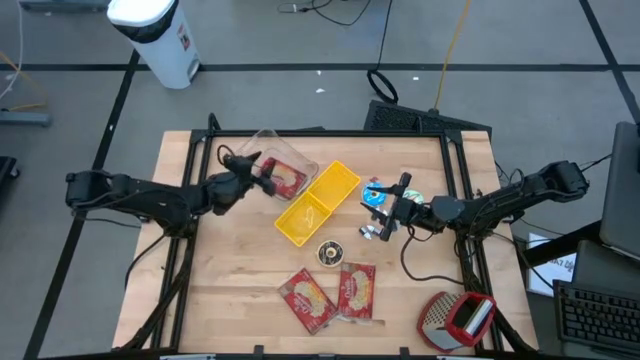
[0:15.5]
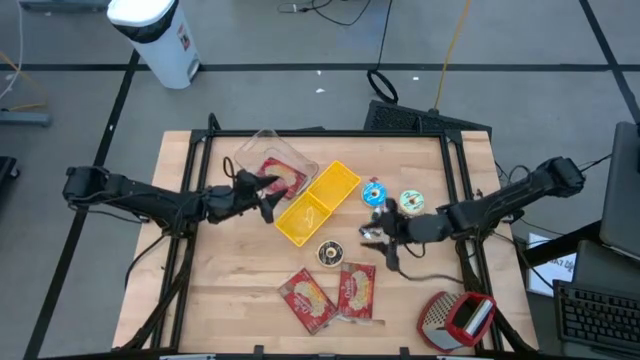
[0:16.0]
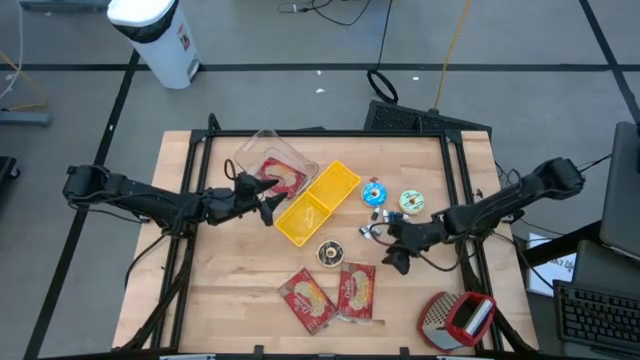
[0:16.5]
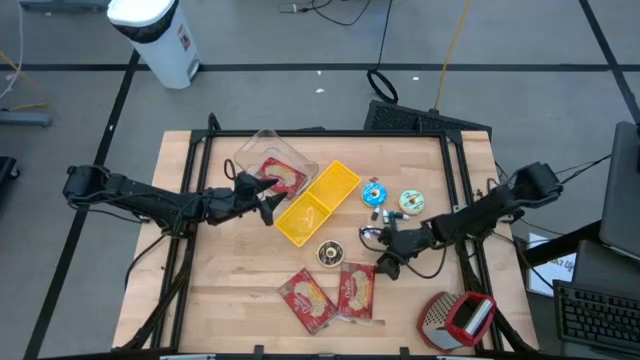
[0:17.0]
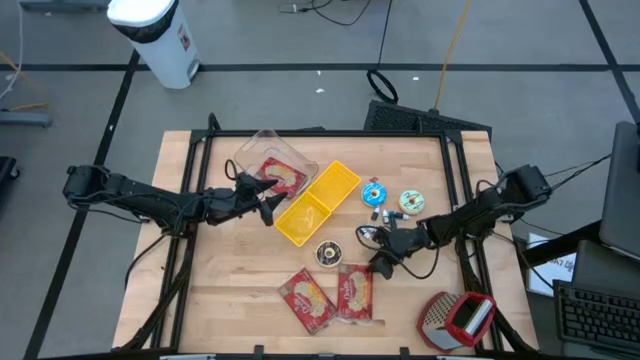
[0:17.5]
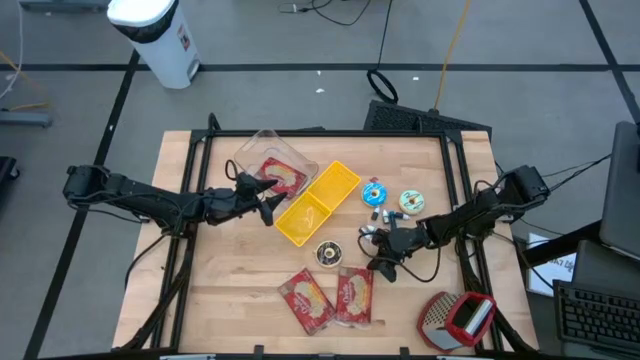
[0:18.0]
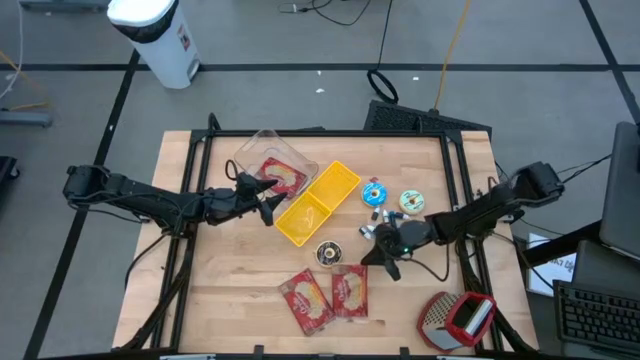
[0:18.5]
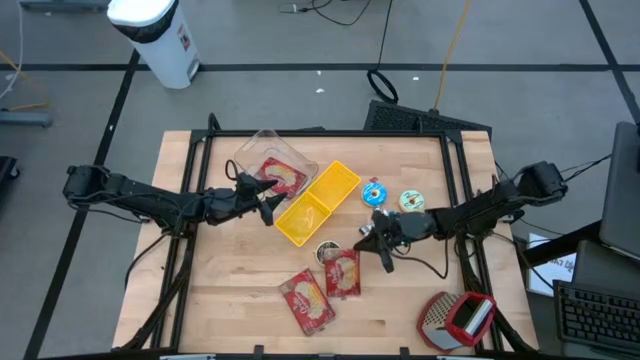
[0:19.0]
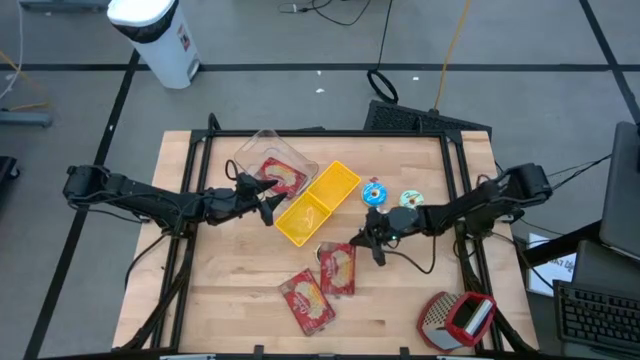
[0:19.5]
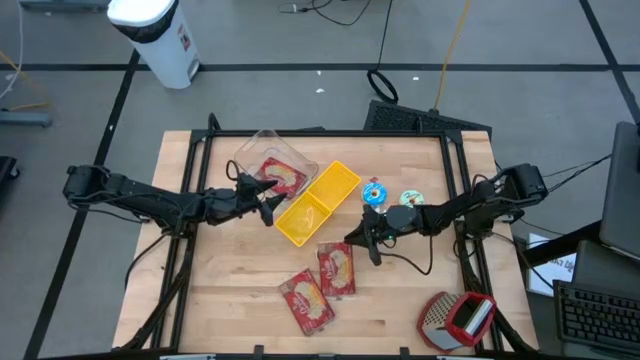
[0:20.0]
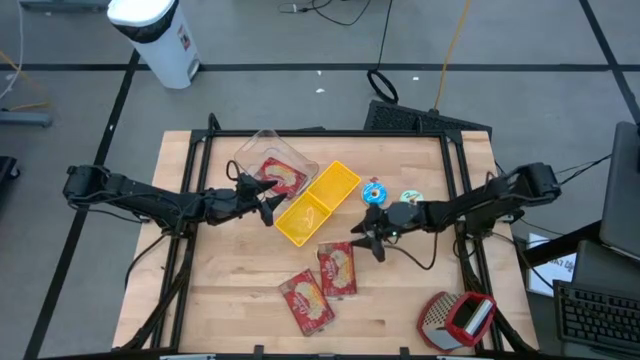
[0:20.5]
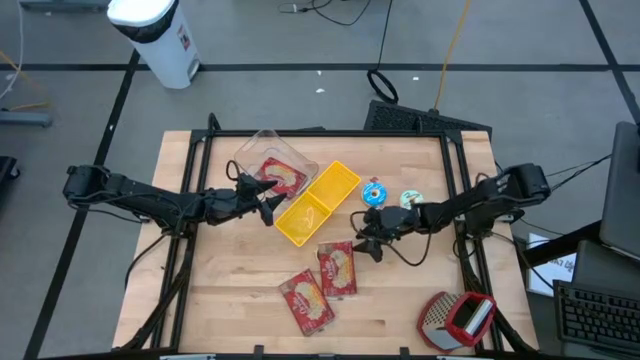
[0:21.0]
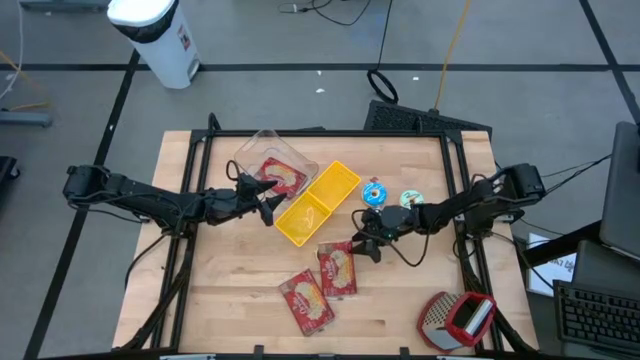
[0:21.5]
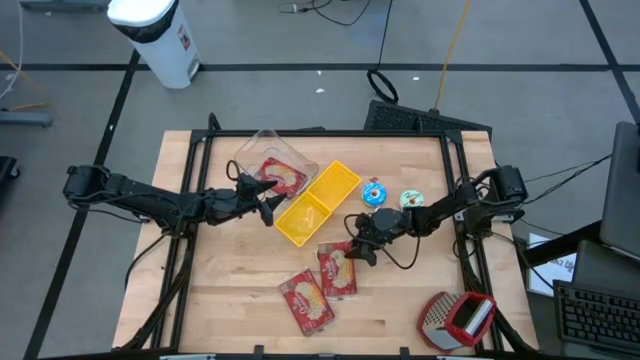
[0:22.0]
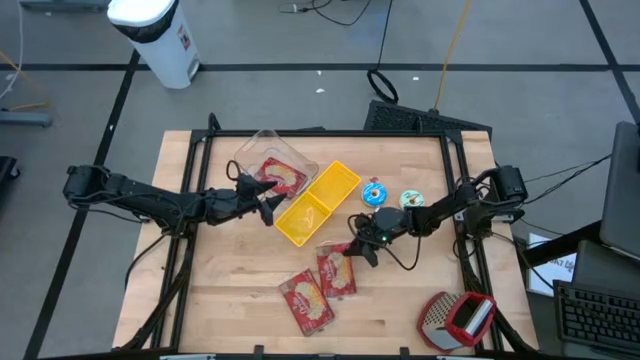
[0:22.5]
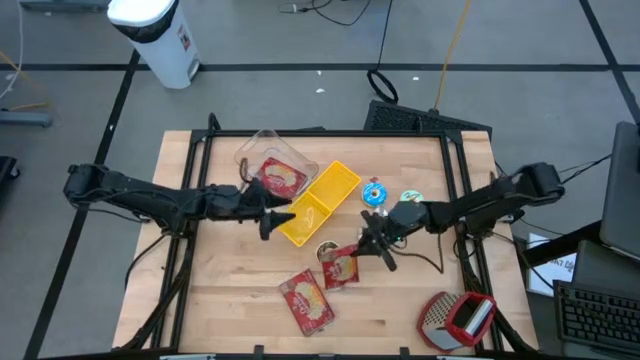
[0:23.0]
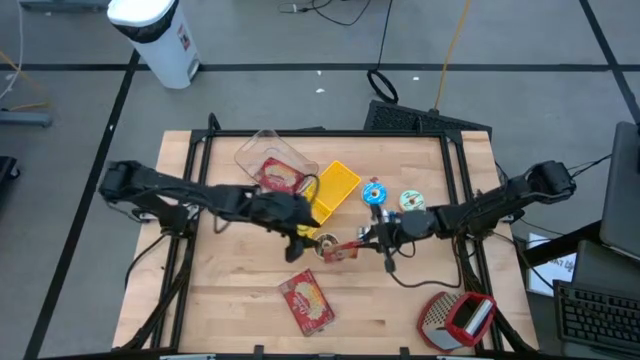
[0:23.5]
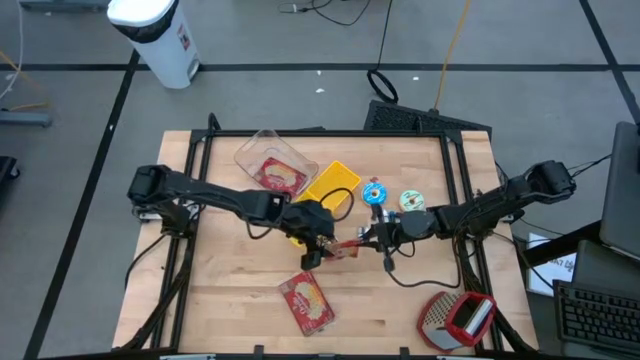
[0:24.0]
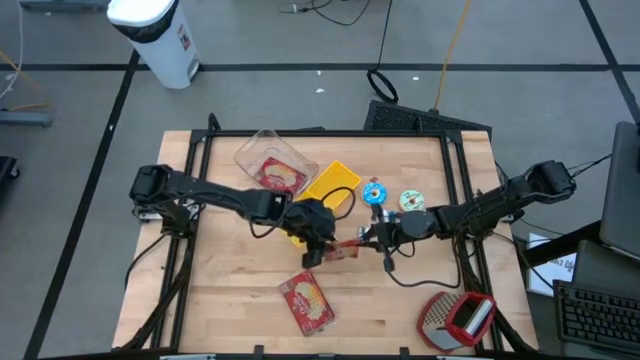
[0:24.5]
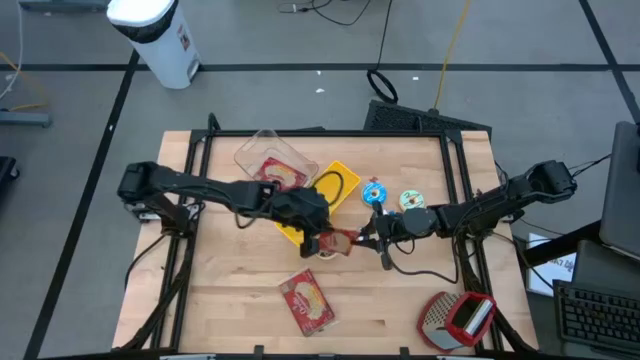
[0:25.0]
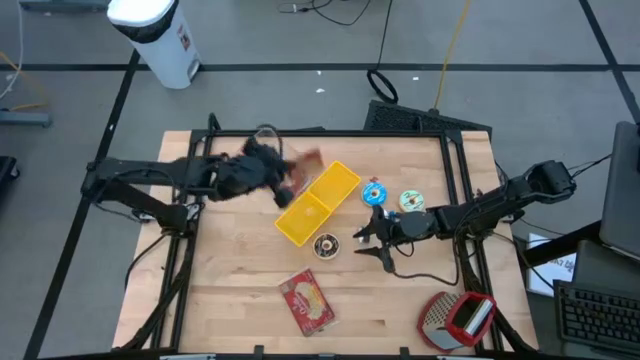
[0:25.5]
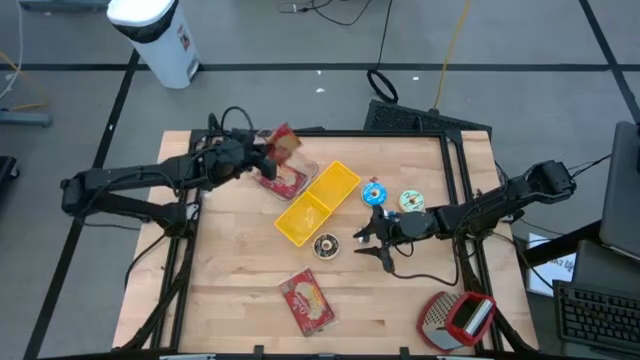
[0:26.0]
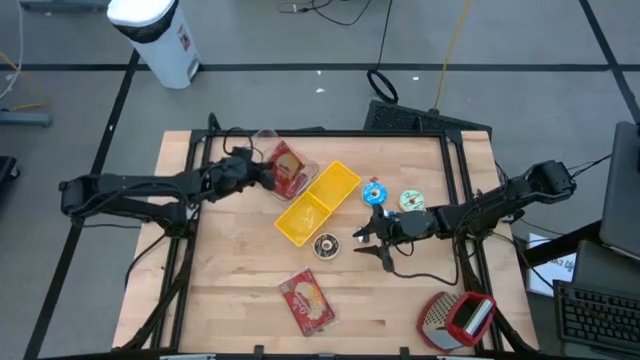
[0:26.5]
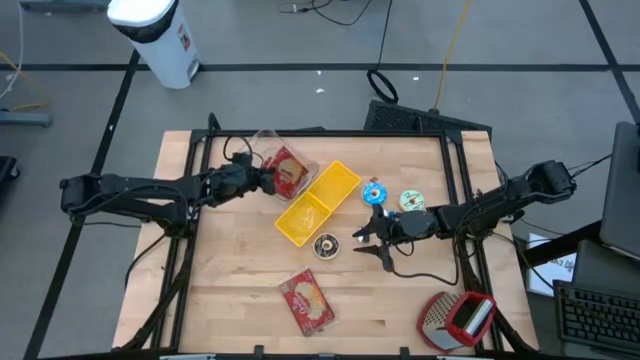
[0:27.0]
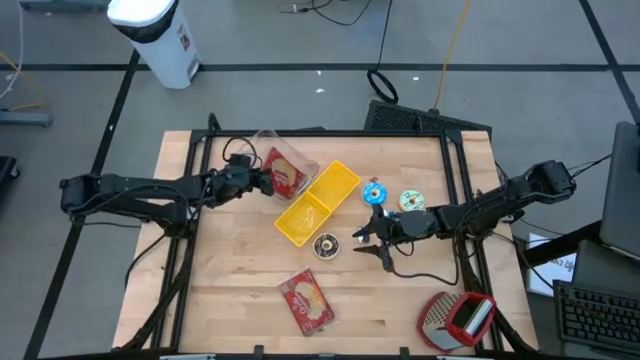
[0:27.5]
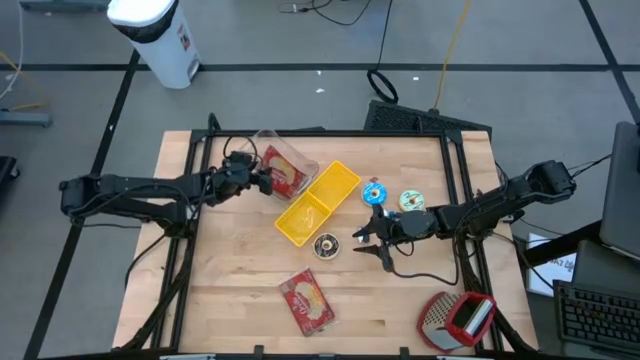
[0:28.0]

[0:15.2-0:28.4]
Put the right red popcorn bag into the transparent bin

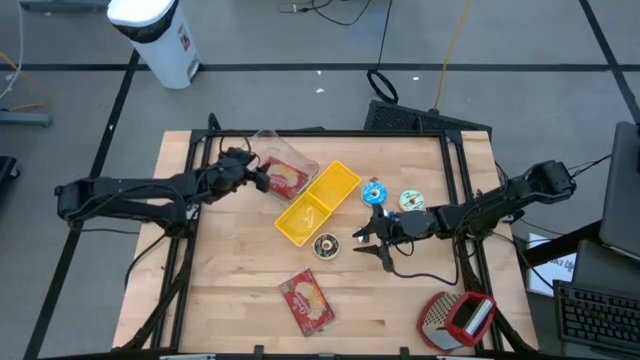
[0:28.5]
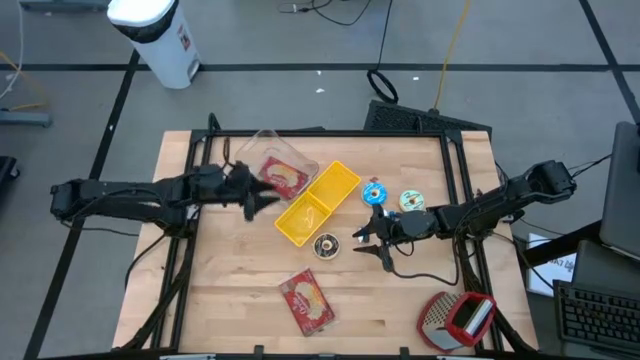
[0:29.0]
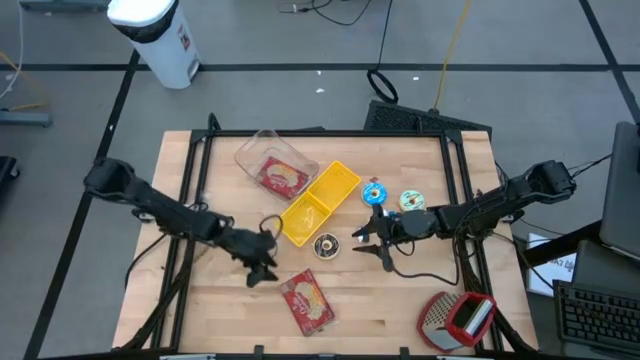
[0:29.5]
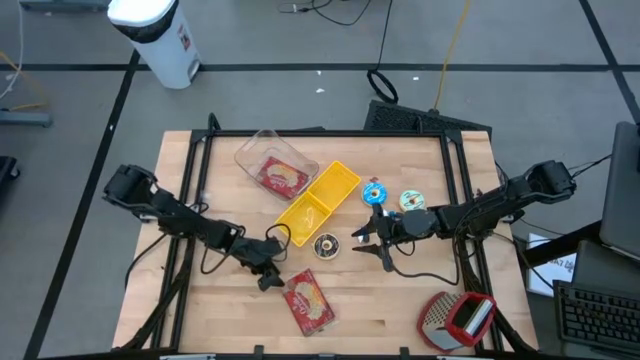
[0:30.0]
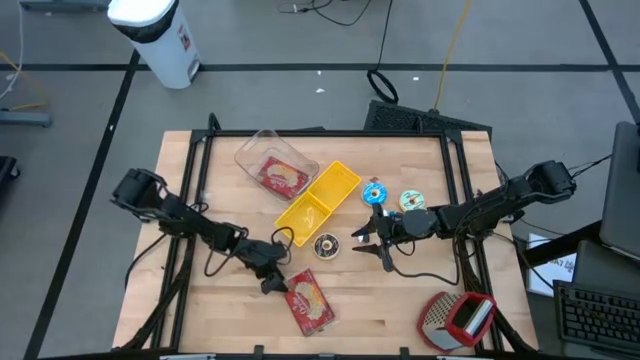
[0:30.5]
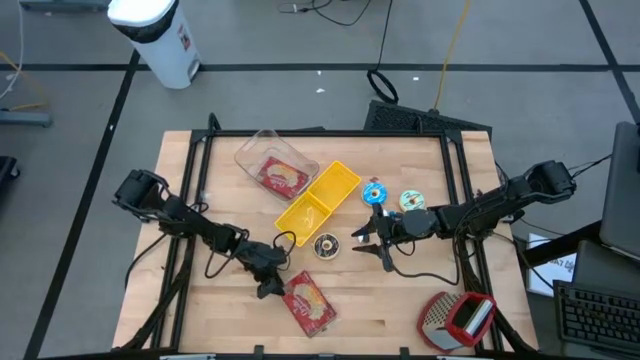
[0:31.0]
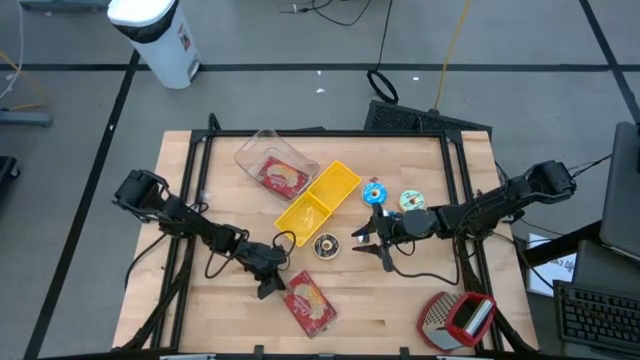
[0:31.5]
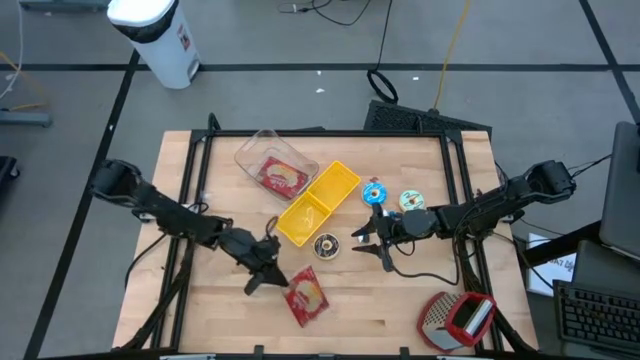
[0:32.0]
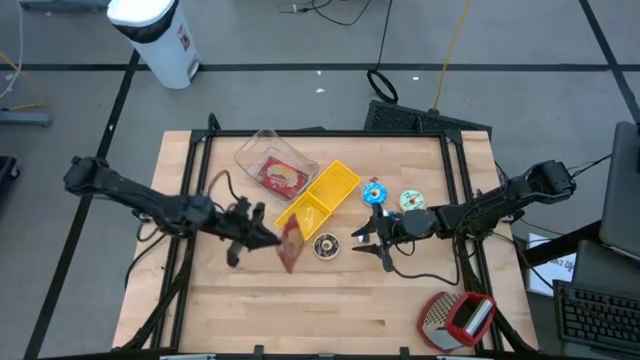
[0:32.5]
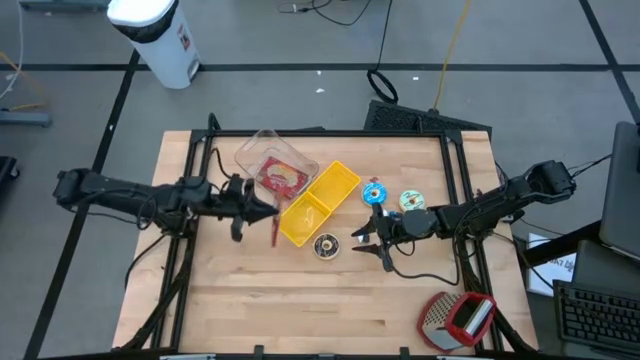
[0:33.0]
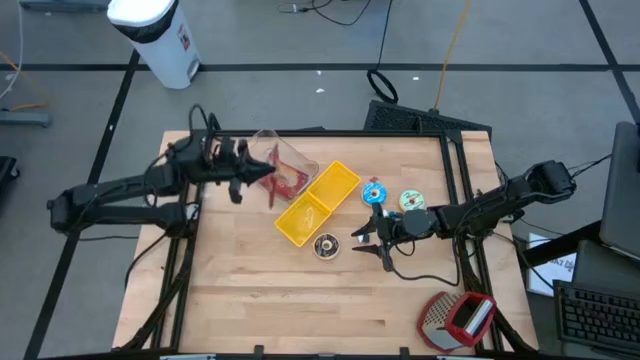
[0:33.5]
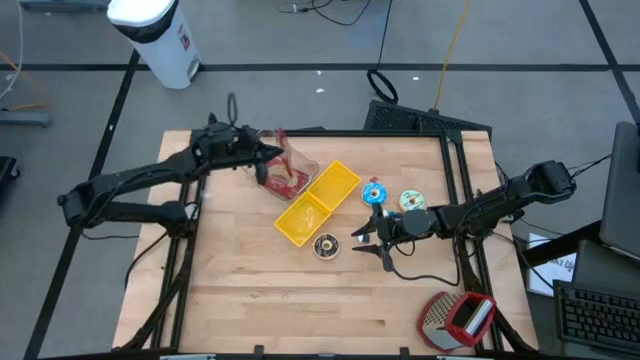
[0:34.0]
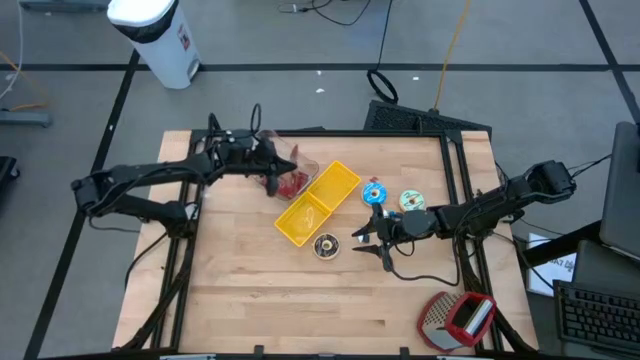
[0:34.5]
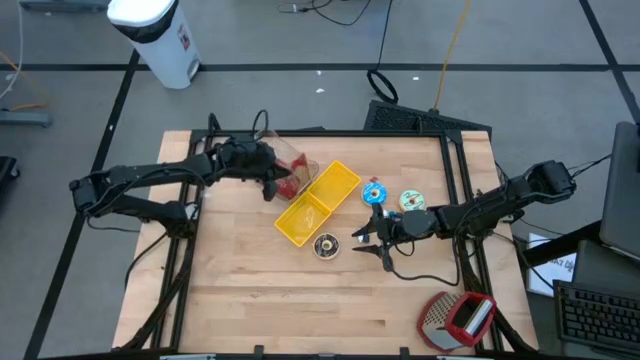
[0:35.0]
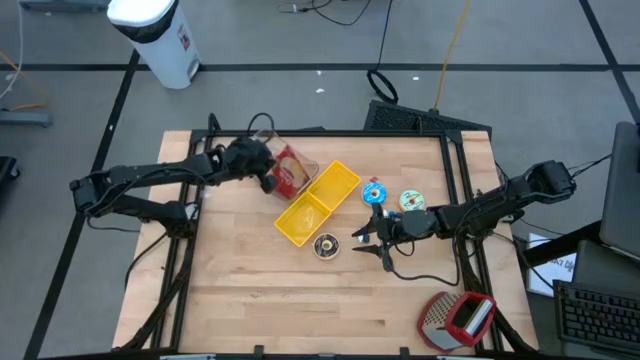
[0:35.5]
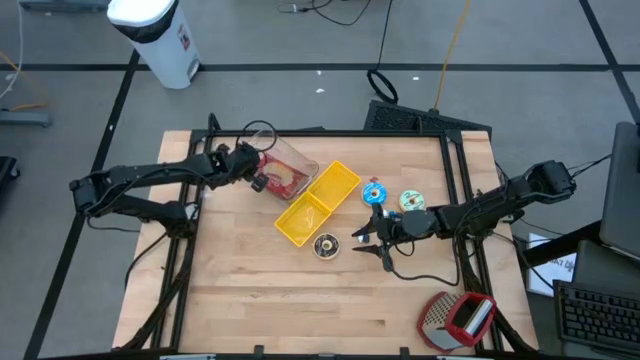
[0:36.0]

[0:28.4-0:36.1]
Put the red popcorn bag into the transparent bin
